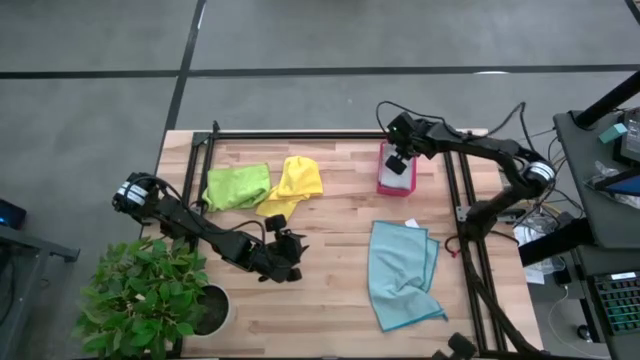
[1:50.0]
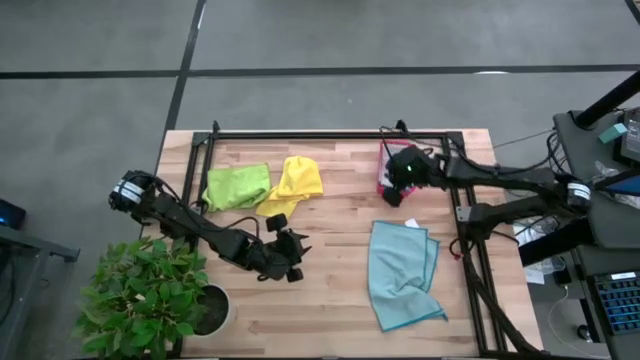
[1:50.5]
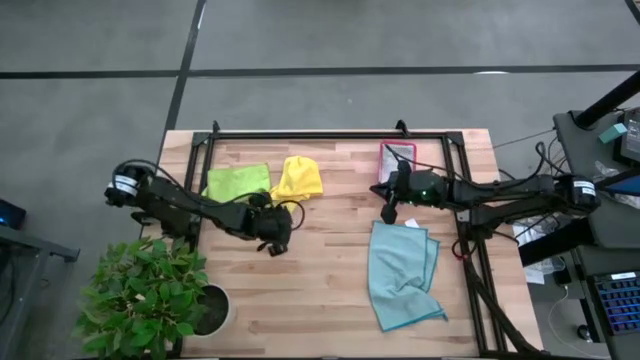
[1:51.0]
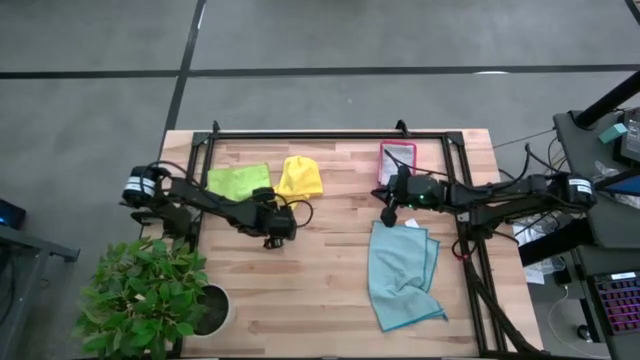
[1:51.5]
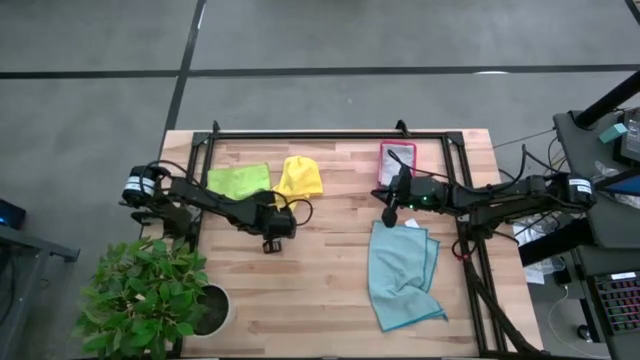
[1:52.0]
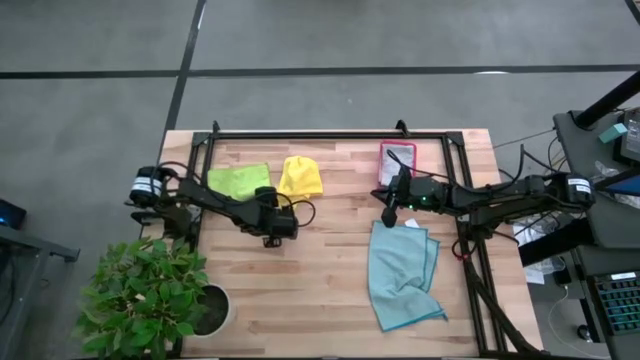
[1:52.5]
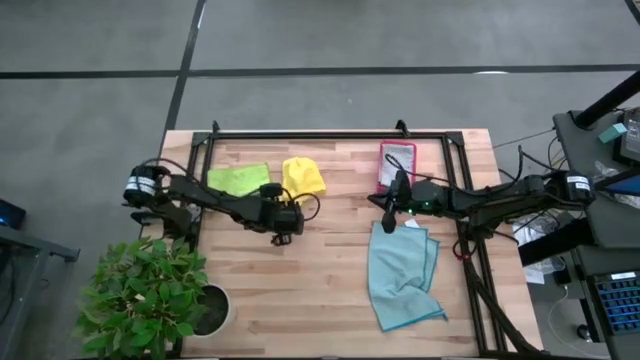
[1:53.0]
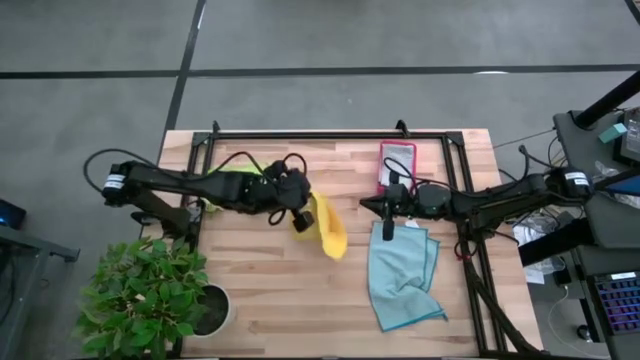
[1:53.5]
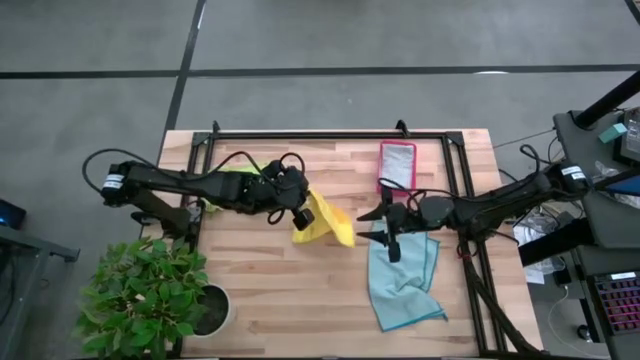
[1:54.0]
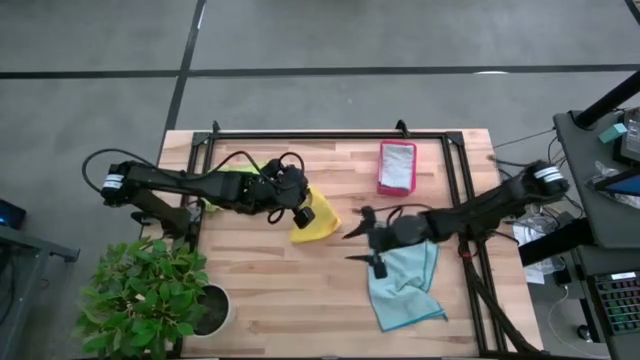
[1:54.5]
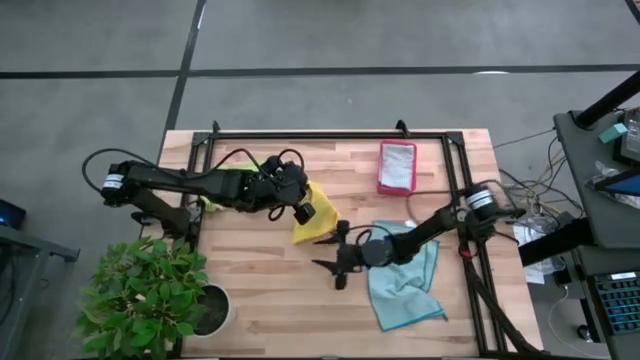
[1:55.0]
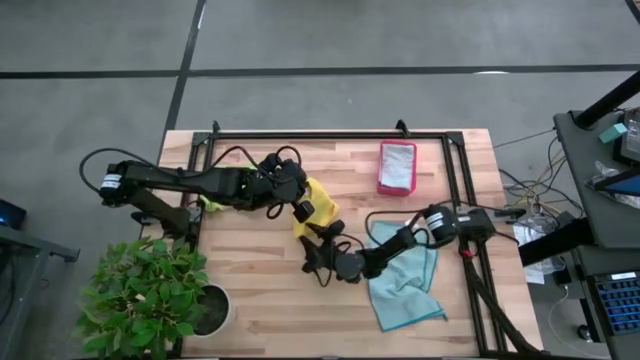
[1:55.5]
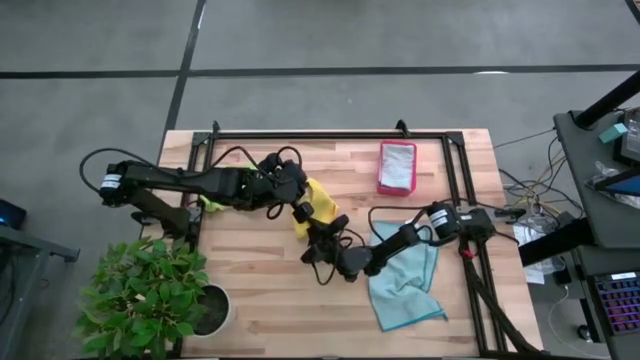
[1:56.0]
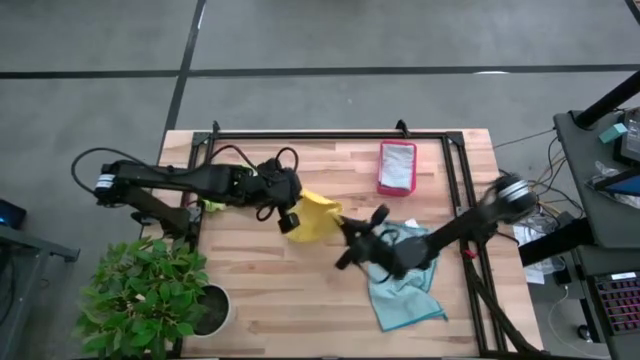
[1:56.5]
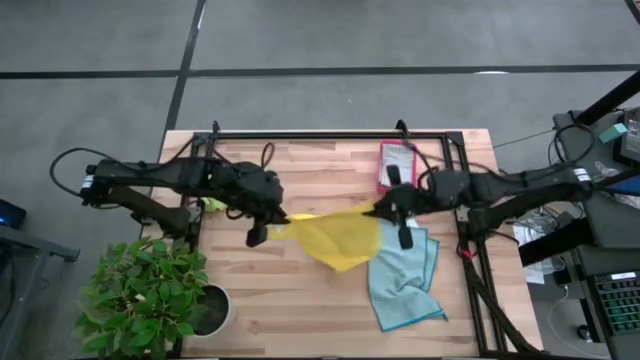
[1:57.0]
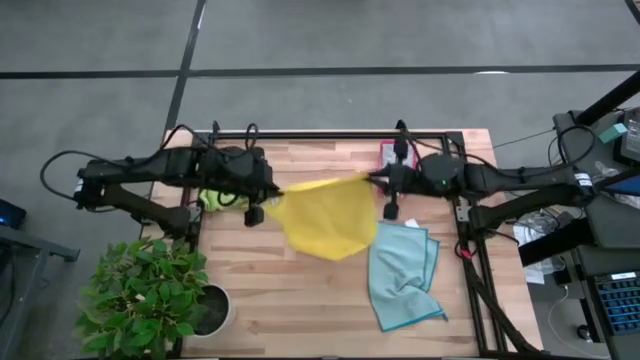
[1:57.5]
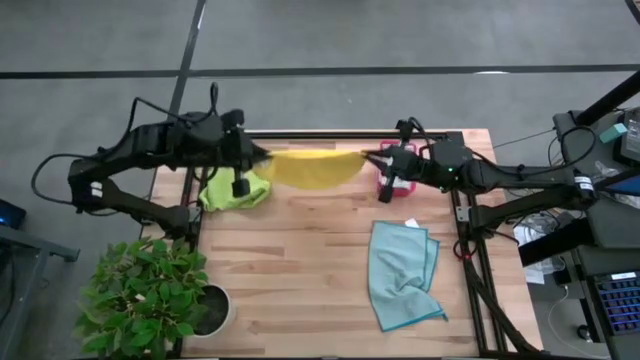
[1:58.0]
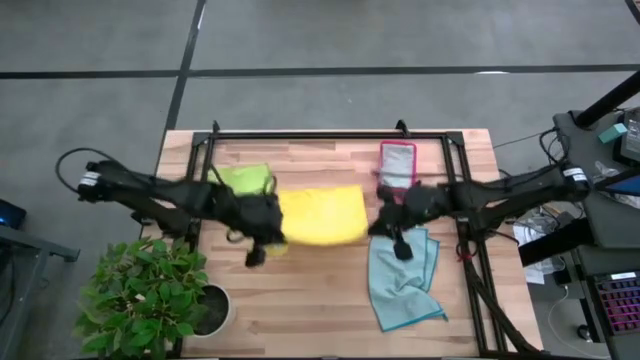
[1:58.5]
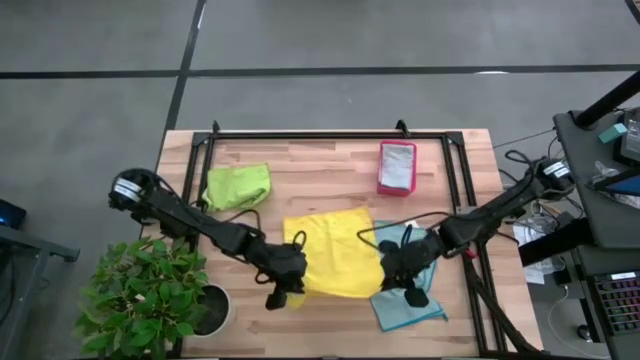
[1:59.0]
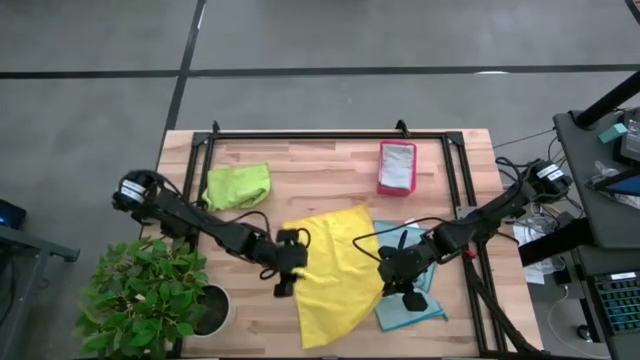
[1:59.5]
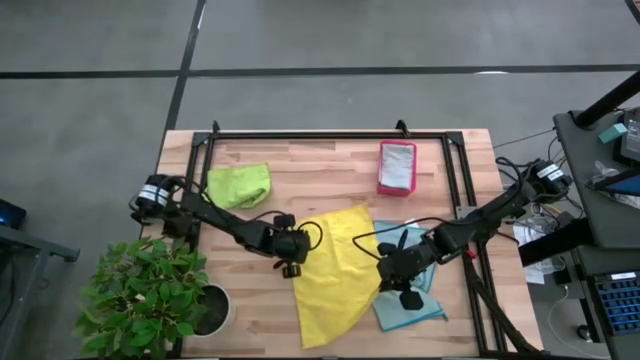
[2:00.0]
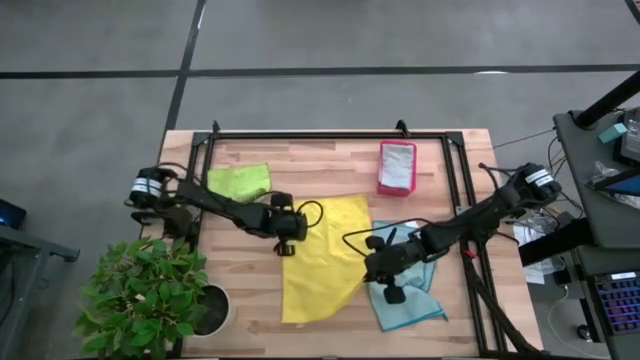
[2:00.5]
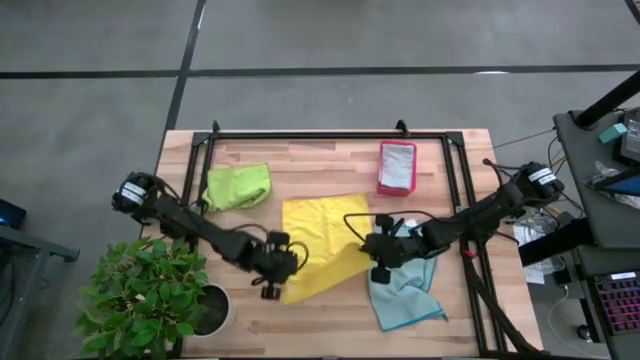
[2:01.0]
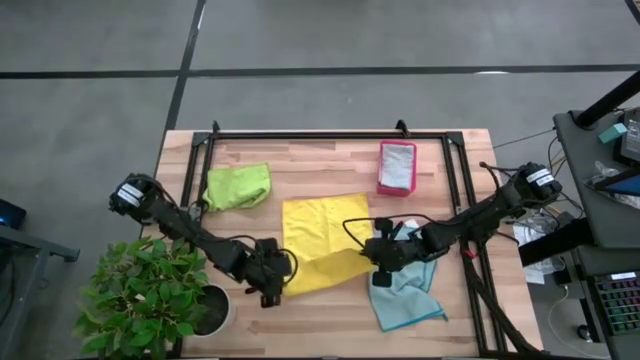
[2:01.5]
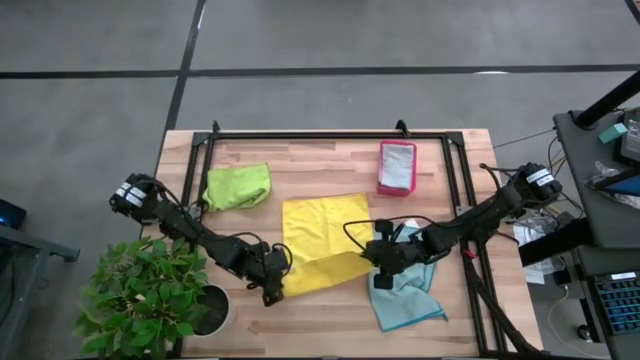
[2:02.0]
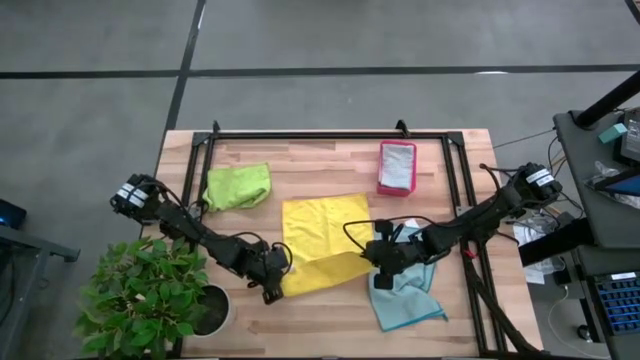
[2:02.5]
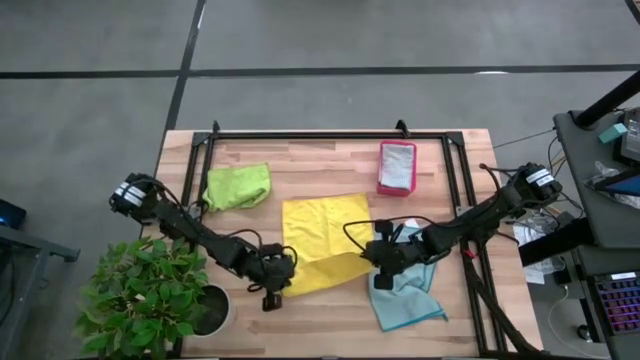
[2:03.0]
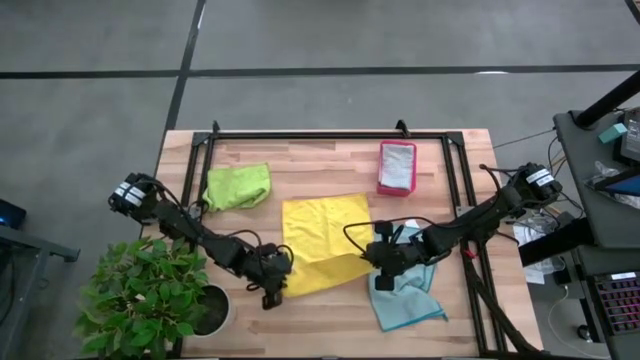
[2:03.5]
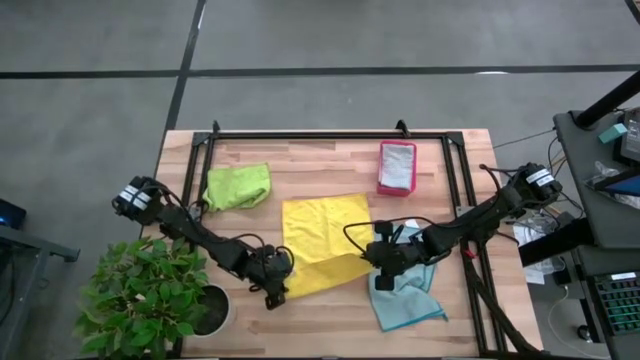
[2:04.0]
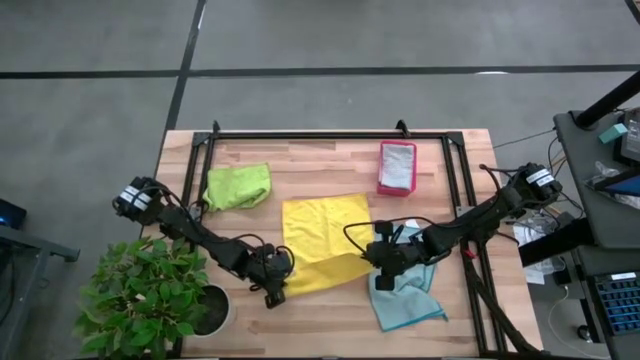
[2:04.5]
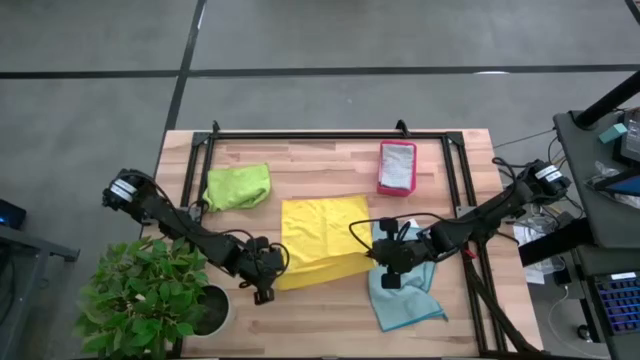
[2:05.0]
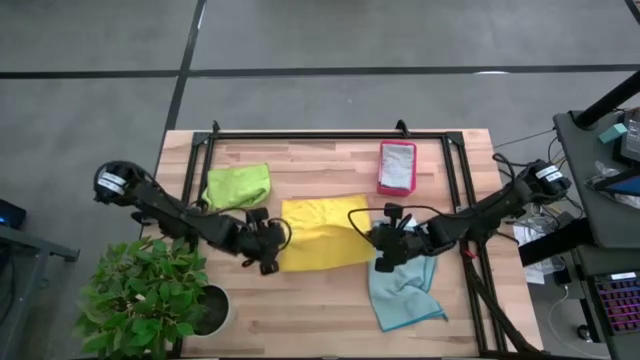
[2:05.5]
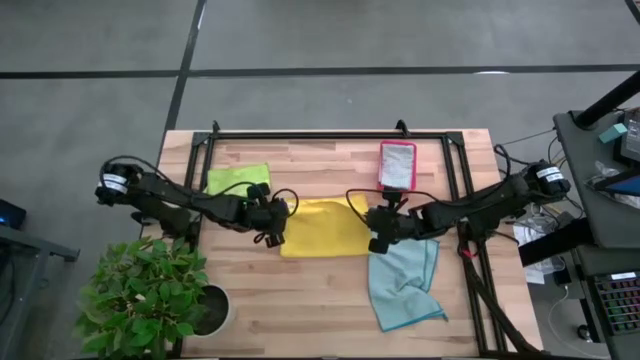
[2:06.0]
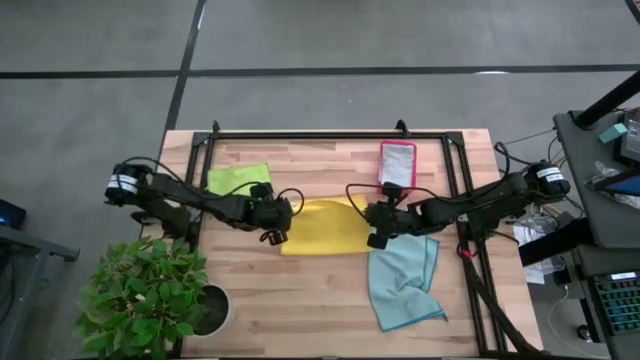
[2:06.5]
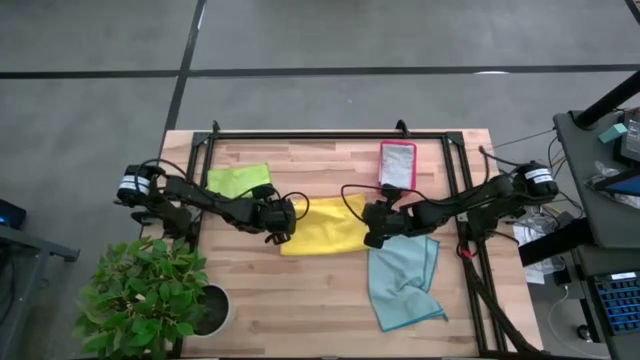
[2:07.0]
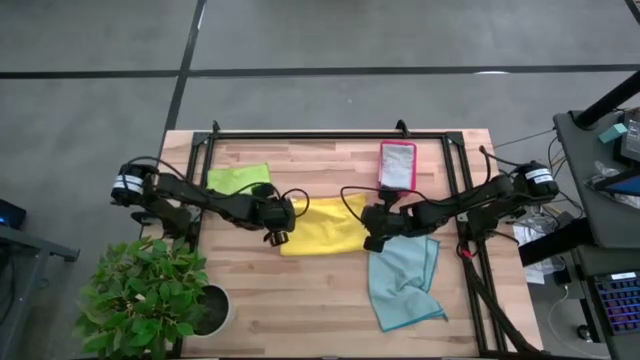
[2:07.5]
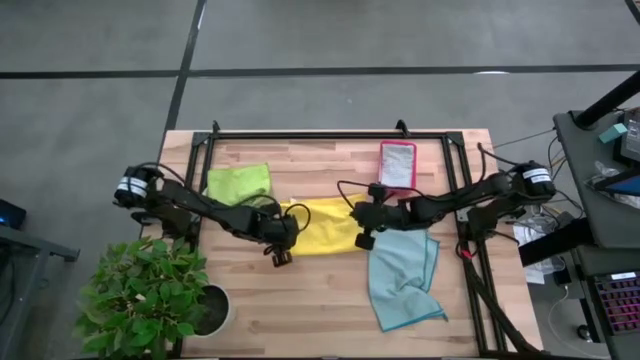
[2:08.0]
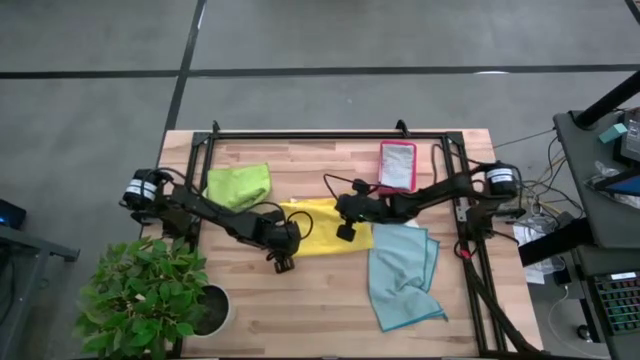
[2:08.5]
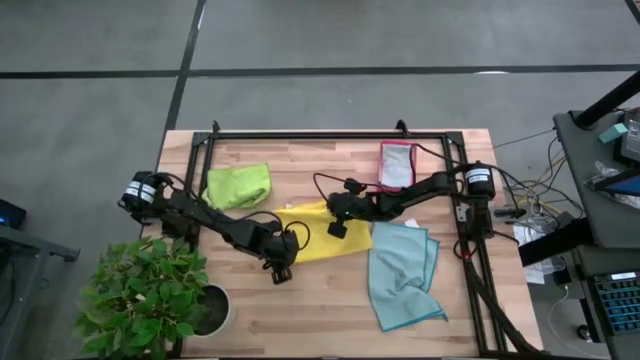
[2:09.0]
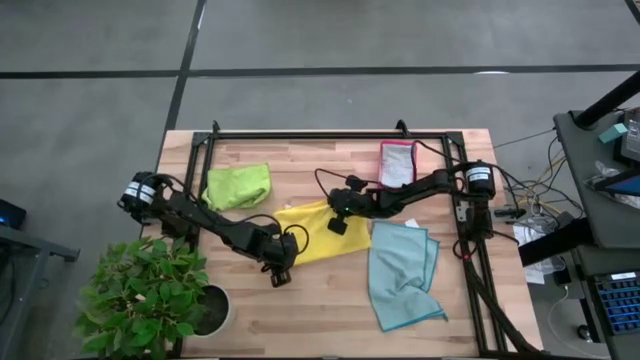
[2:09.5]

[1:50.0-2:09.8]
Task: Fold microfiber towels
Fold the yellow microfiber towel

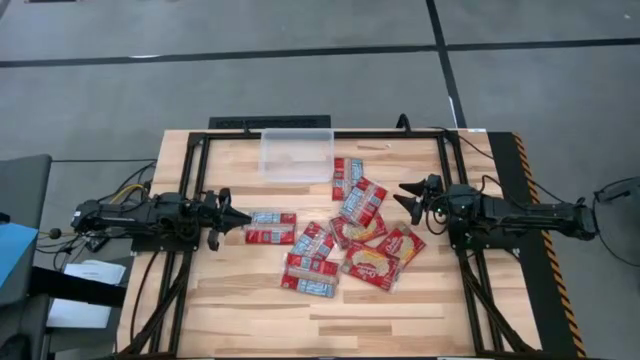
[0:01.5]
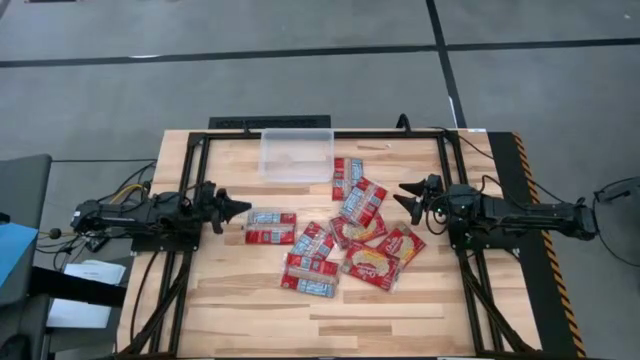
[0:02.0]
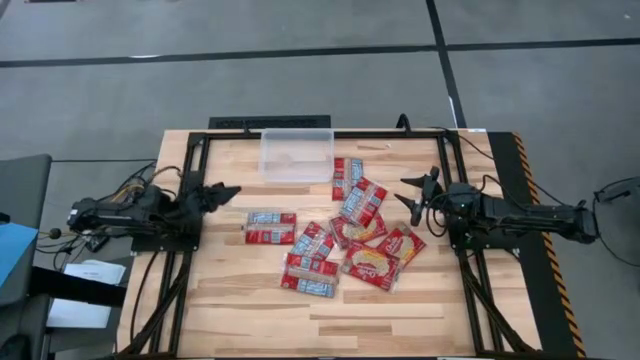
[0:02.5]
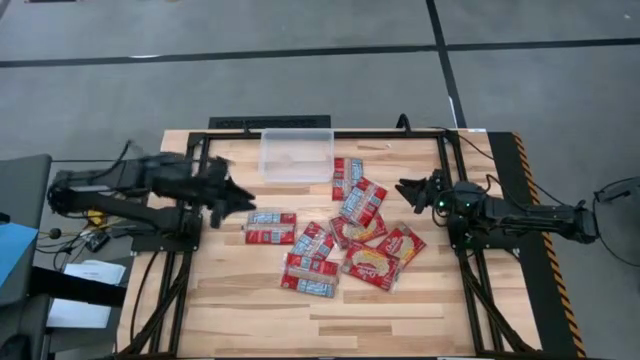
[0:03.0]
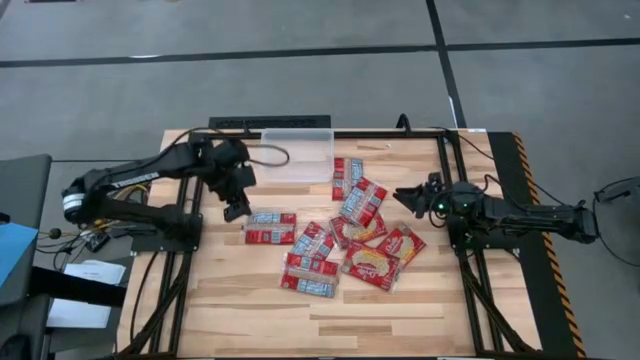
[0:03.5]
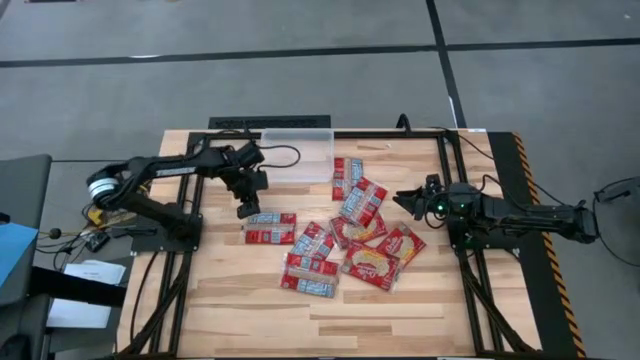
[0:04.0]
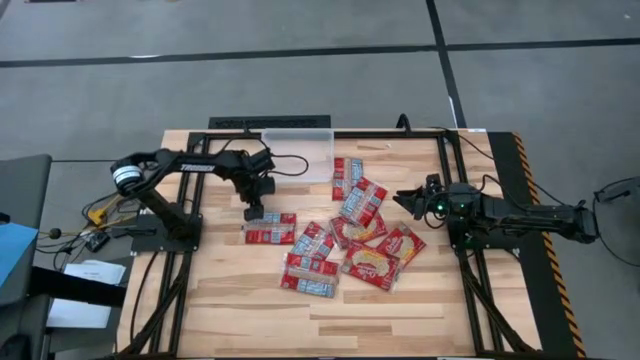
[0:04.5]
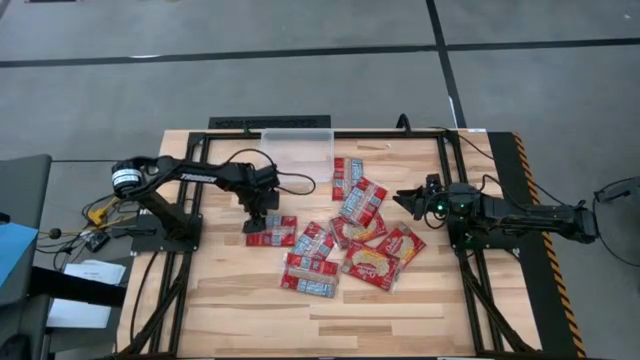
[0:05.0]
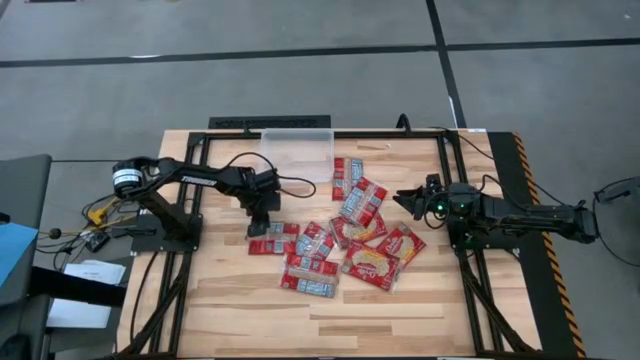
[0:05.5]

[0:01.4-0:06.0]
Task: Sort popcorn bags into baskets
Put the red popcorn bag into the transparent bin
